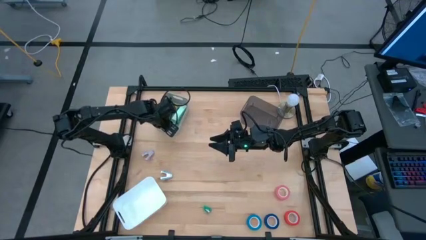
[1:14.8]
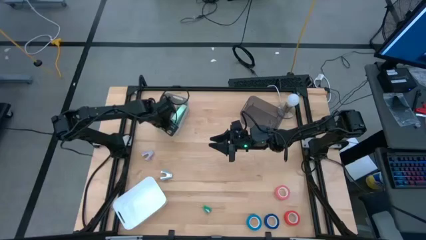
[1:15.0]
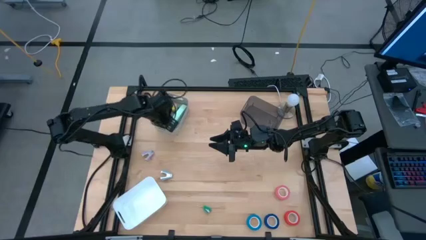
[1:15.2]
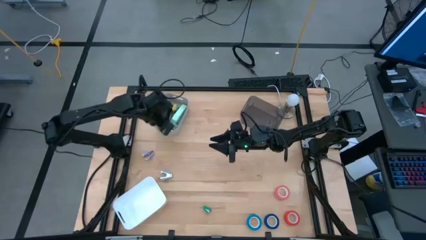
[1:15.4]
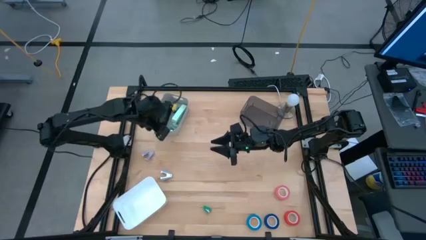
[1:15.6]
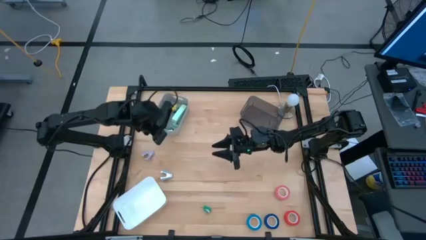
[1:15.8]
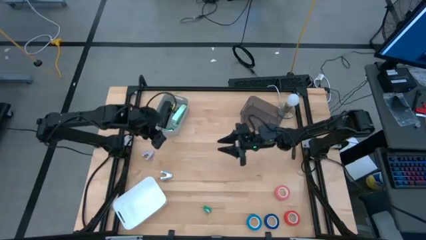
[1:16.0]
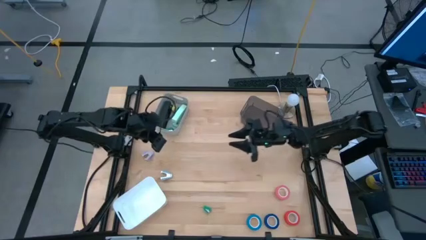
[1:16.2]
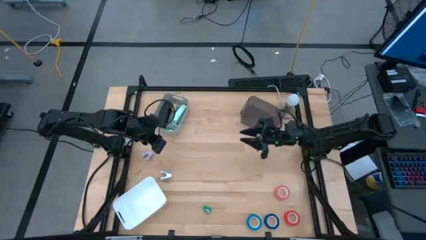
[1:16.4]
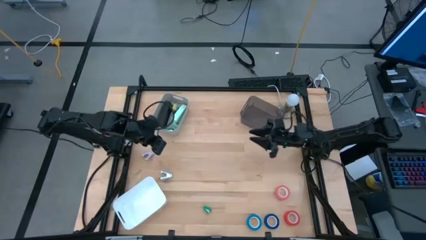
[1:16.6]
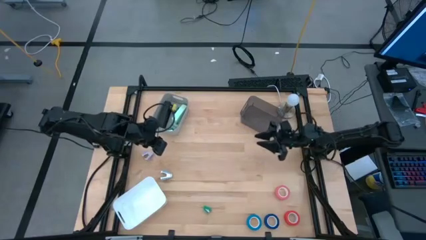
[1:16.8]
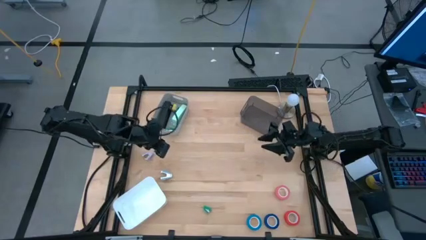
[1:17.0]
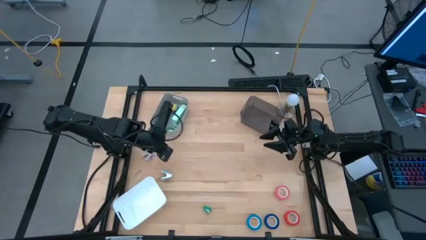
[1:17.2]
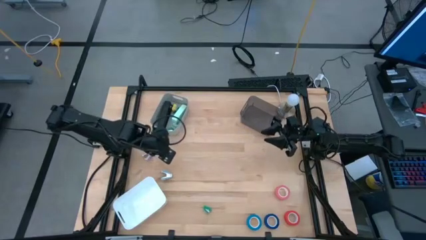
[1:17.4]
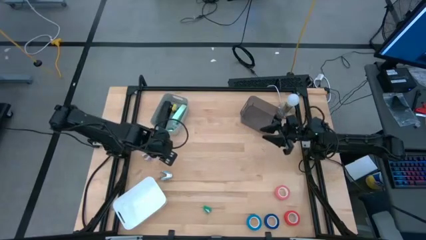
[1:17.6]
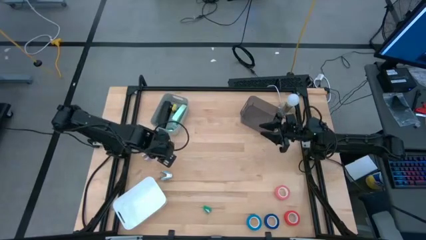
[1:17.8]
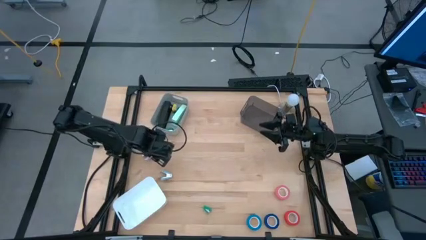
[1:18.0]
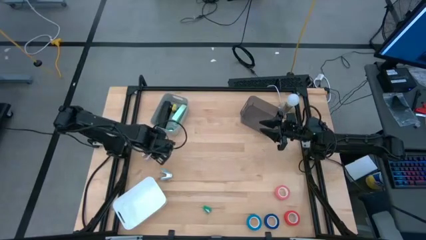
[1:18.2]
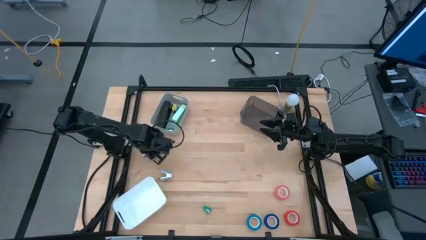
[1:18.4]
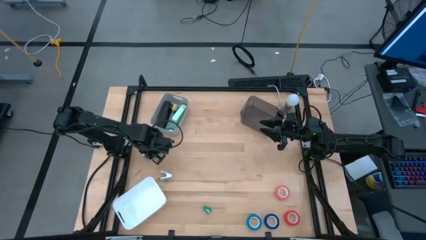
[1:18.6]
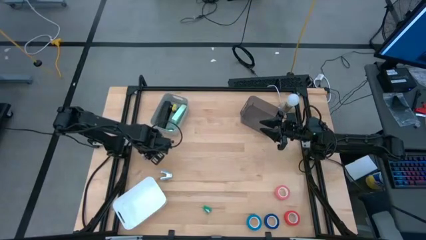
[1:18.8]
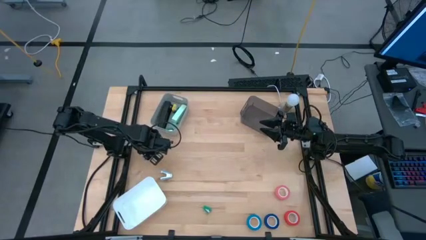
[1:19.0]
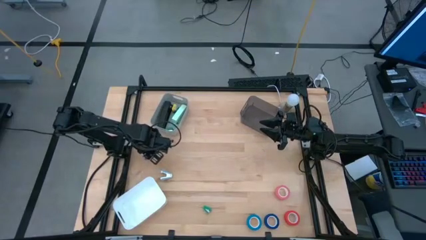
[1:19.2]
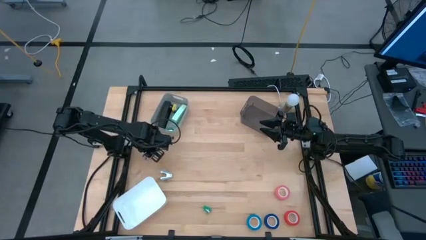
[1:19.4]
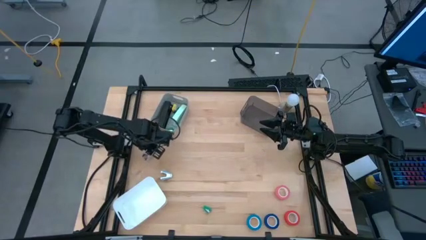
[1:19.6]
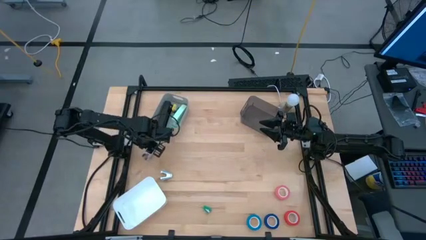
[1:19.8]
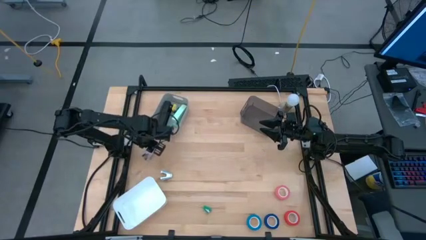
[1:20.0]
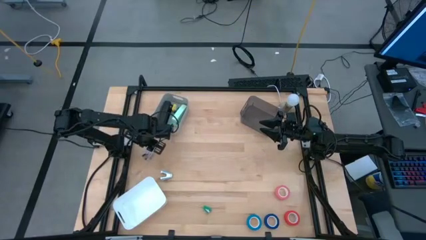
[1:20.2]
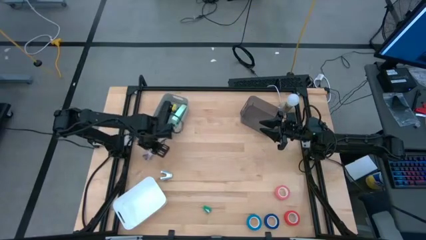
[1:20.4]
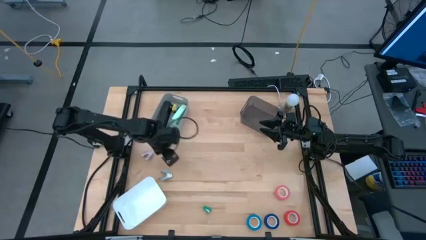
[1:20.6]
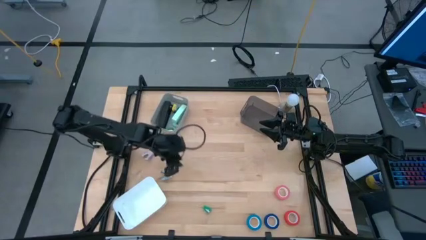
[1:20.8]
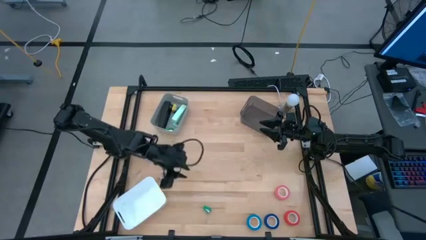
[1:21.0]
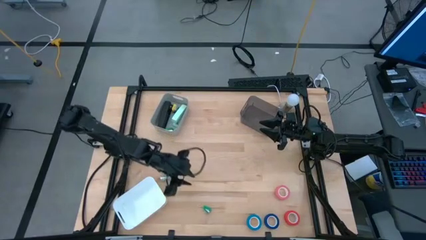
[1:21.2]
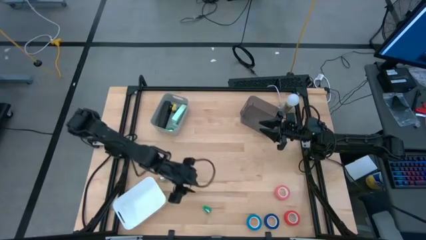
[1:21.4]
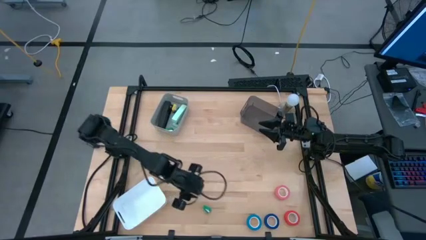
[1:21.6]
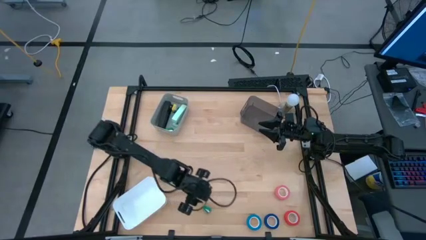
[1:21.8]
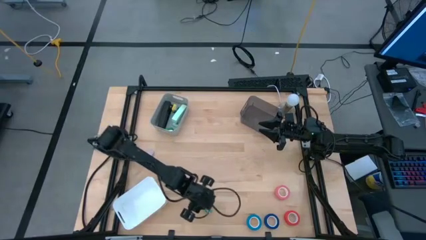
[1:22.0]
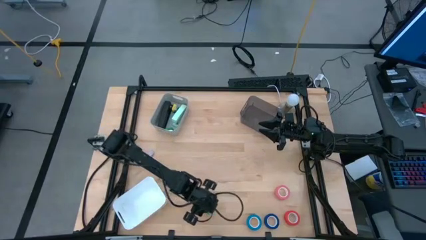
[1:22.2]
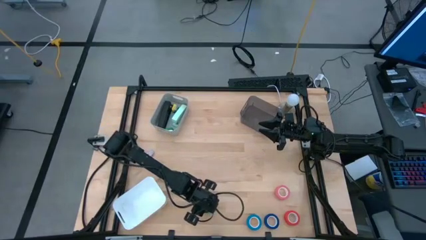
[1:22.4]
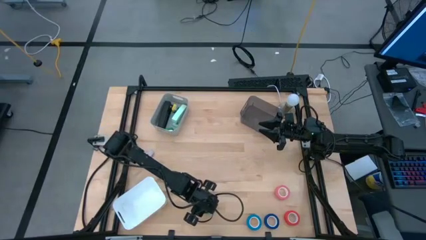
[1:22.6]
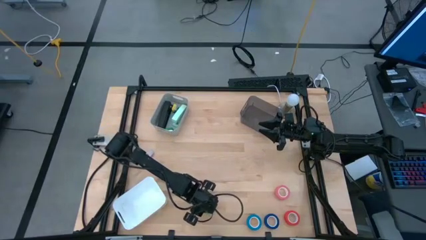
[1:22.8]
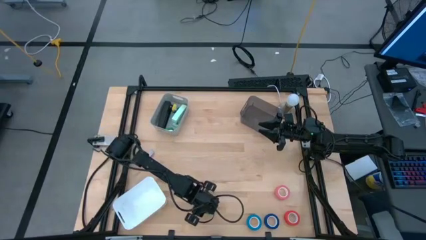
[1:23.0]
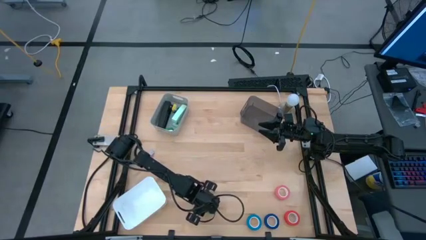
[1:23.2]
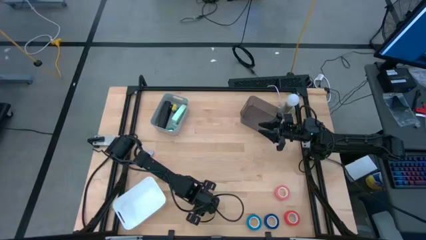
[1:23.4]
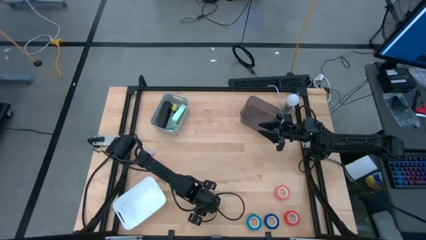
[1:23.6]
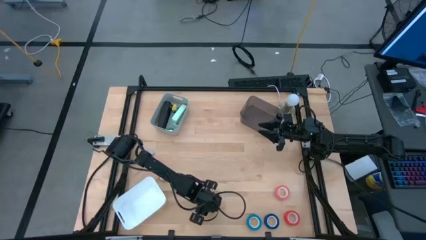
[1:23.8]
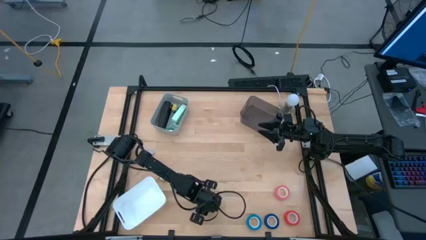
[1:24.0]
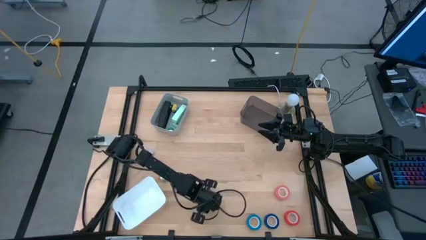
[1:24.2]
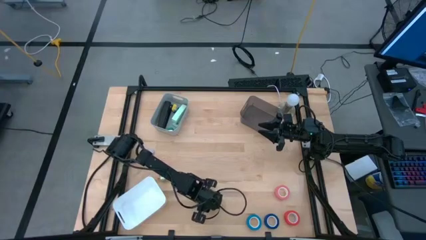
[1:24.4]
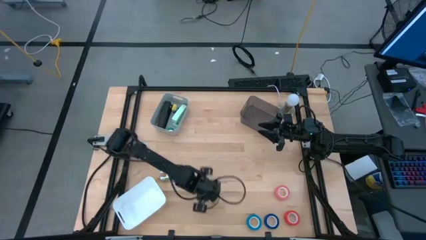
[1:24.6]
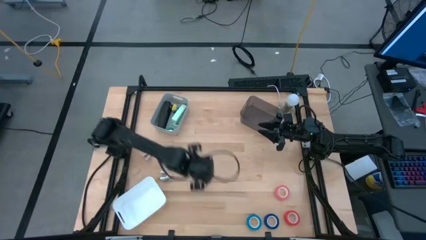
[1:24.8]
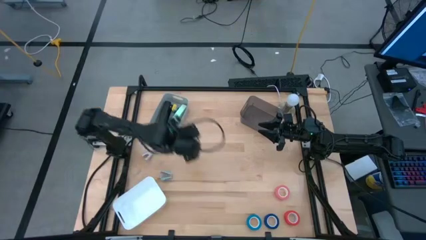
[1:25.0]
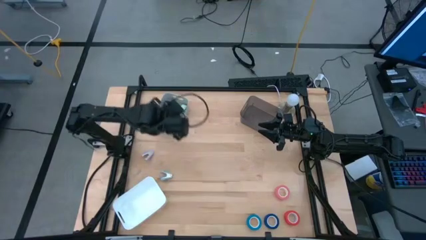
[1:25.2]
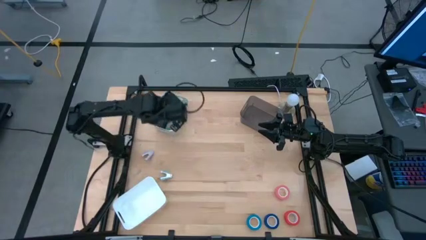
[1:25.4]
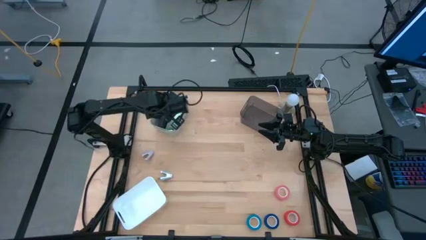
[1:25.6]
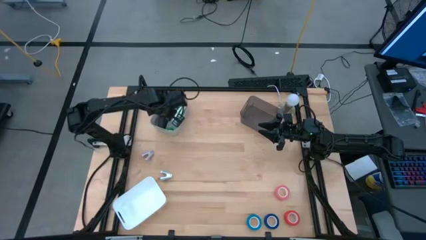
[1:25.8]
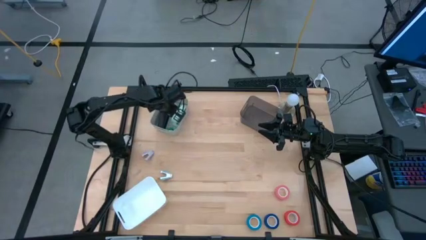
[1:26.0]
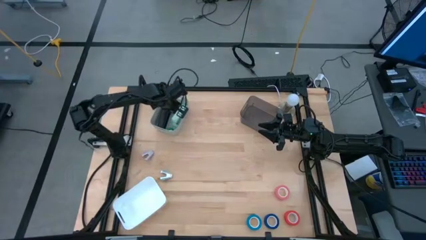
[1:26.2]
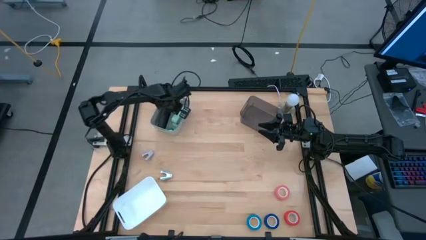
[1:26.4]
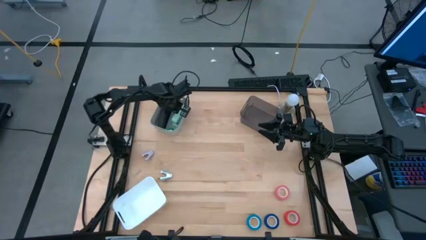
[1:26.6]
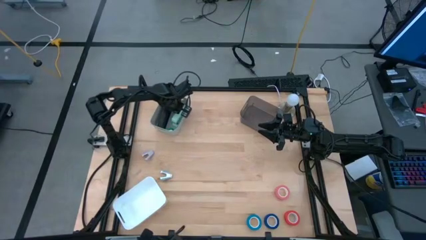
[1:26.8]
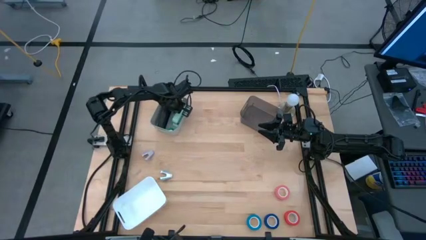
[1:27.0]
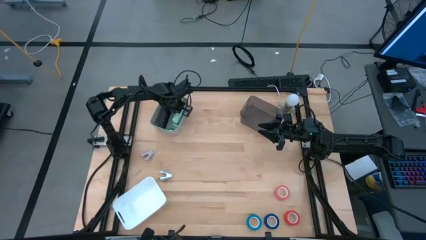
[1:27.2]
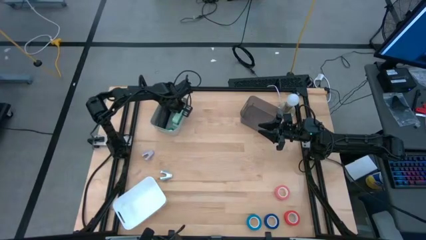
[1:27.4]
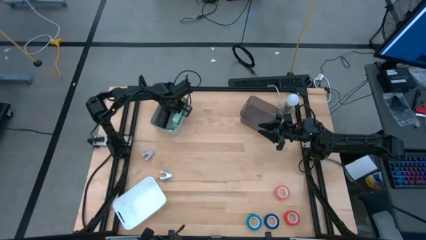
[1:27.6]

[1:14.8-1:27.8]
Task: Pick and place Stapler, Stapler remover, tape
Put the small green stapler into the gray bin
